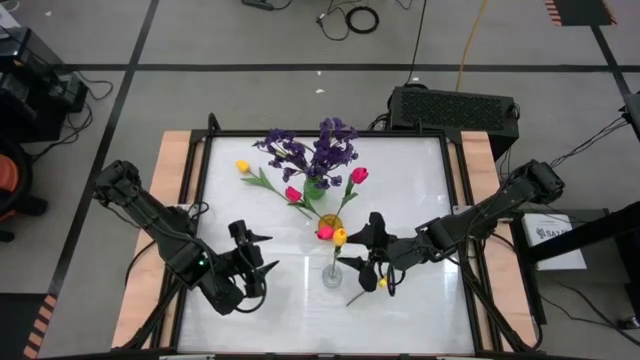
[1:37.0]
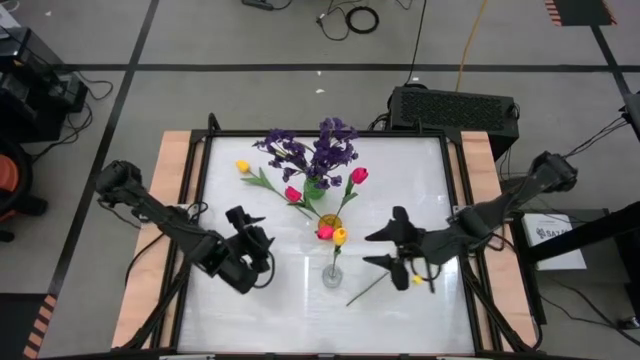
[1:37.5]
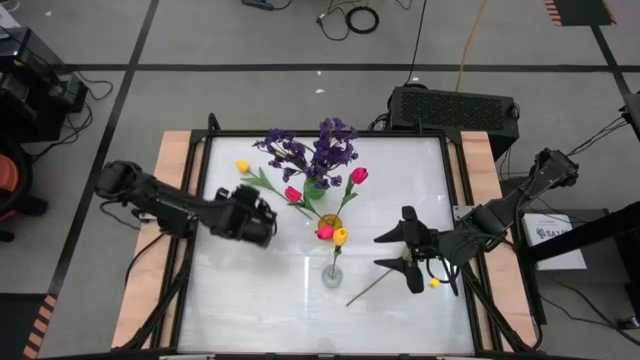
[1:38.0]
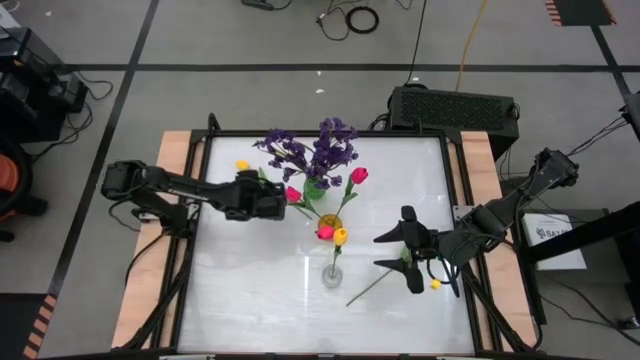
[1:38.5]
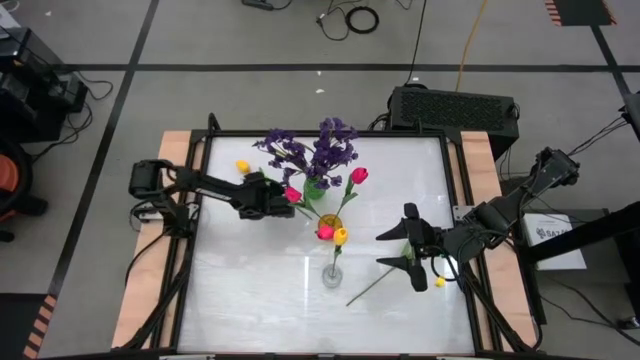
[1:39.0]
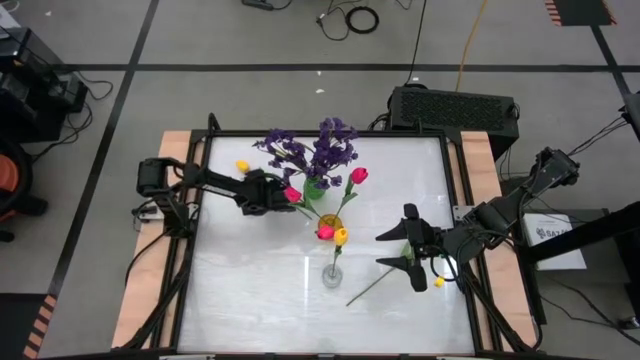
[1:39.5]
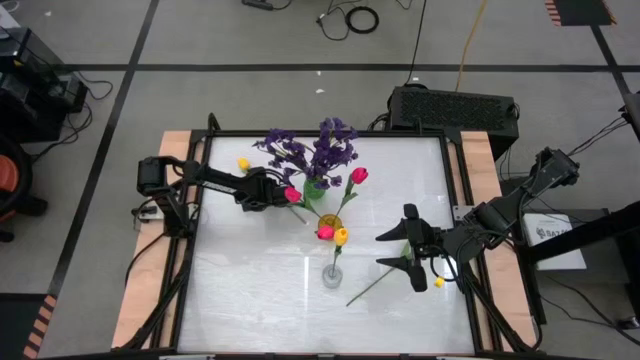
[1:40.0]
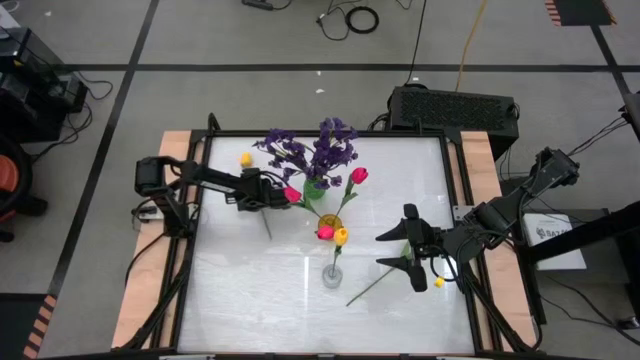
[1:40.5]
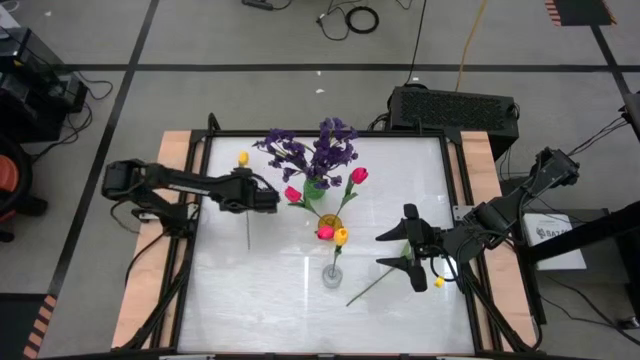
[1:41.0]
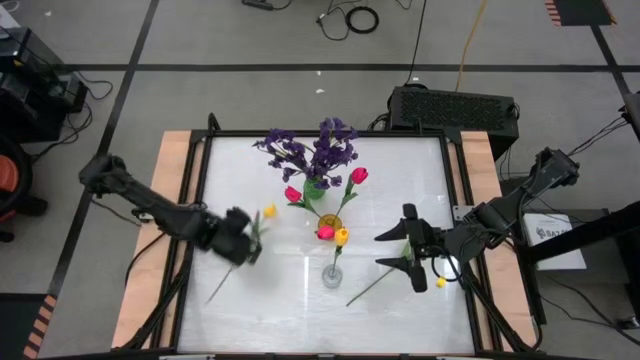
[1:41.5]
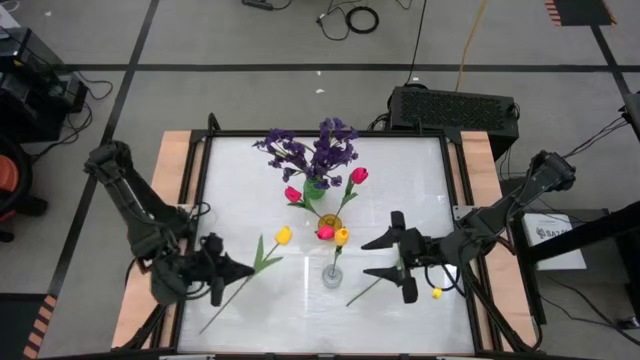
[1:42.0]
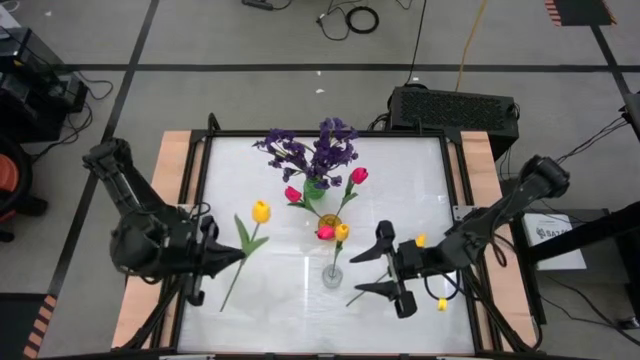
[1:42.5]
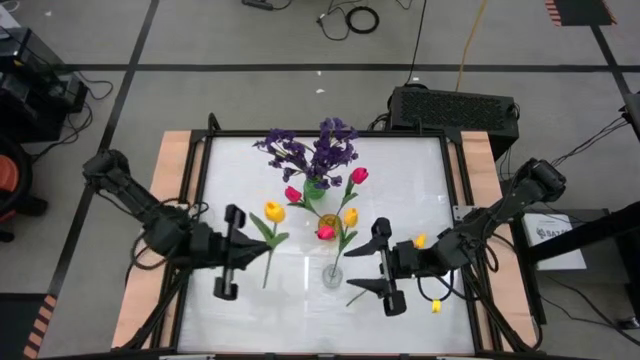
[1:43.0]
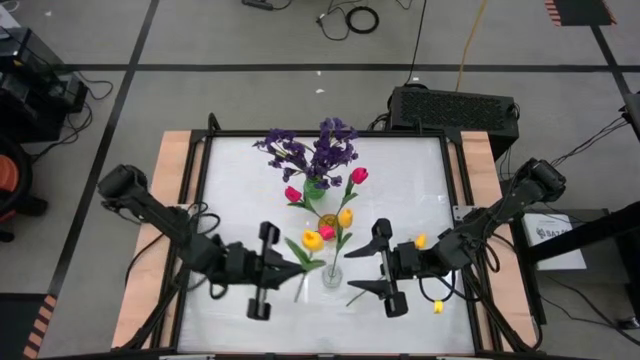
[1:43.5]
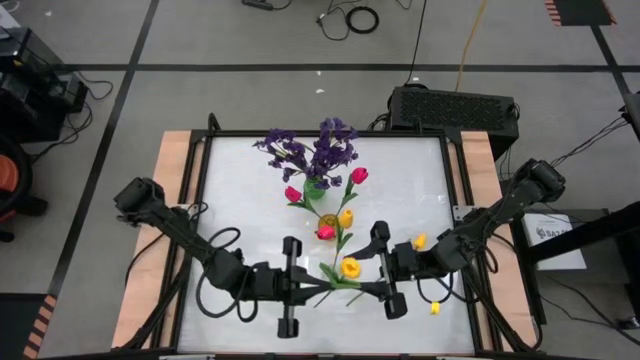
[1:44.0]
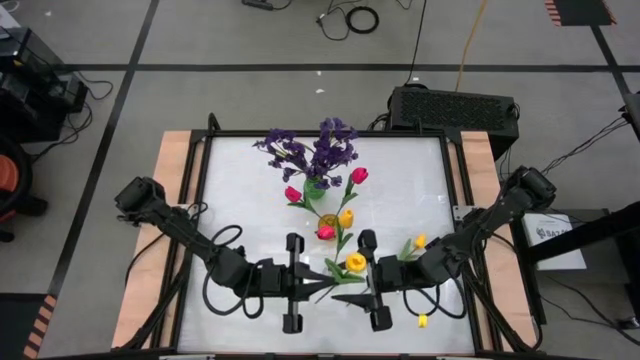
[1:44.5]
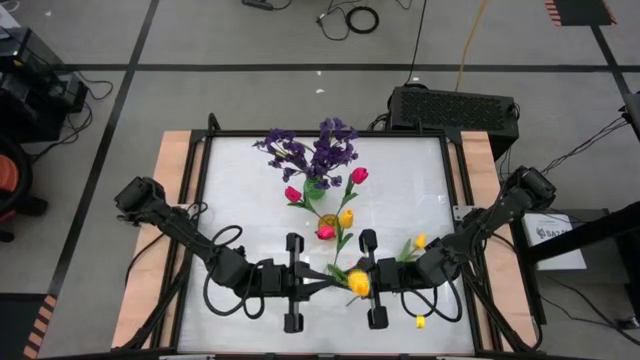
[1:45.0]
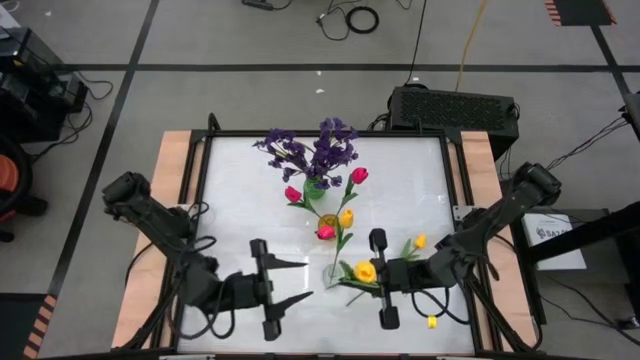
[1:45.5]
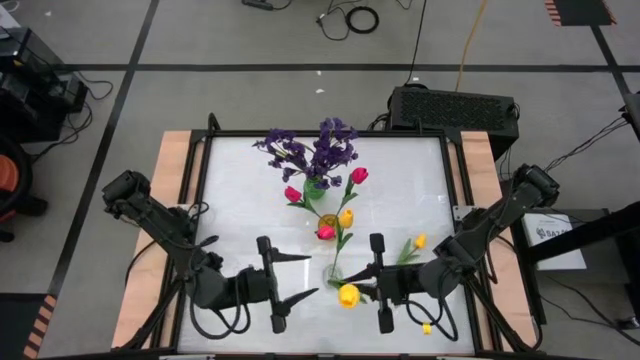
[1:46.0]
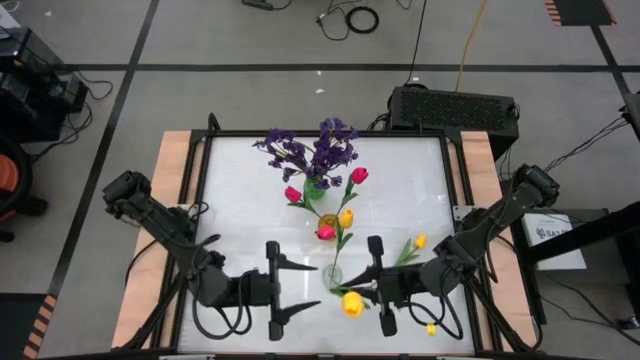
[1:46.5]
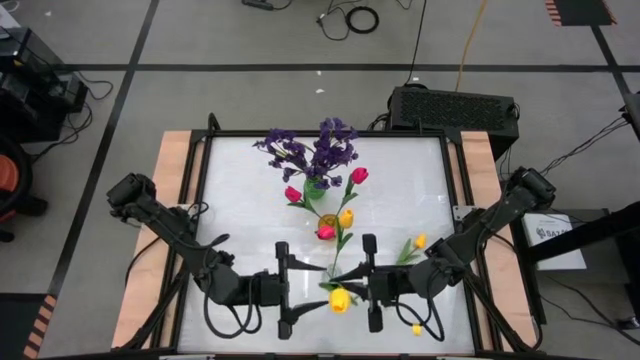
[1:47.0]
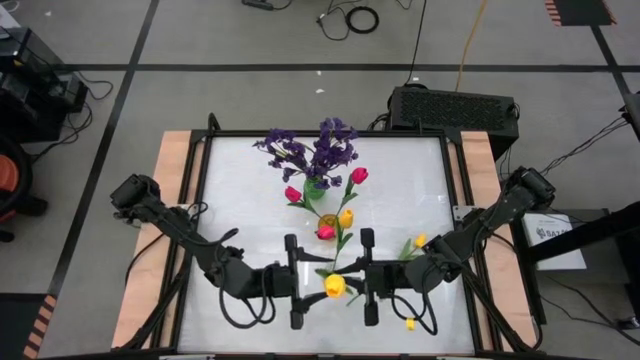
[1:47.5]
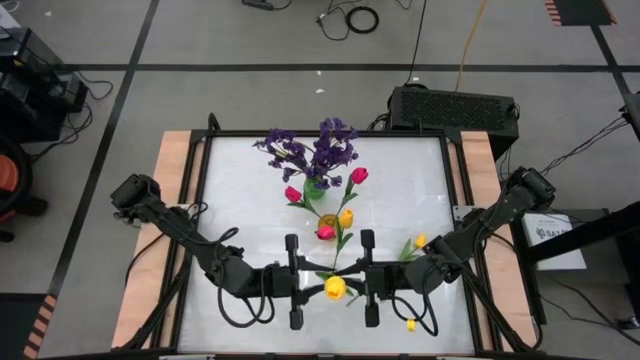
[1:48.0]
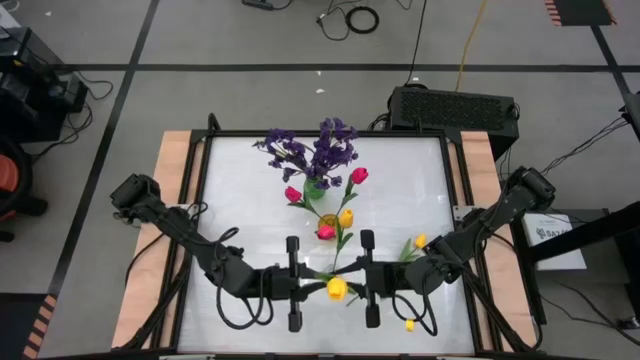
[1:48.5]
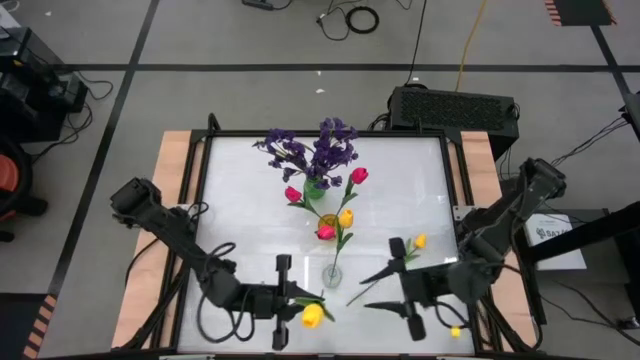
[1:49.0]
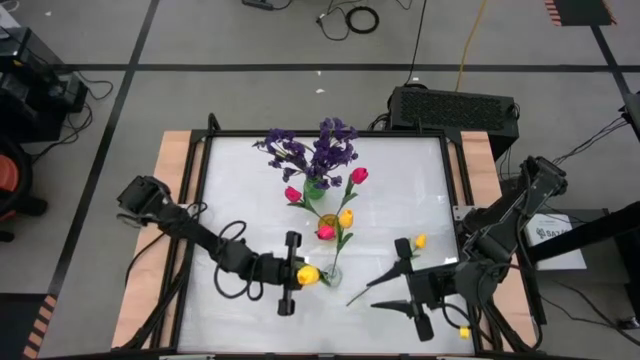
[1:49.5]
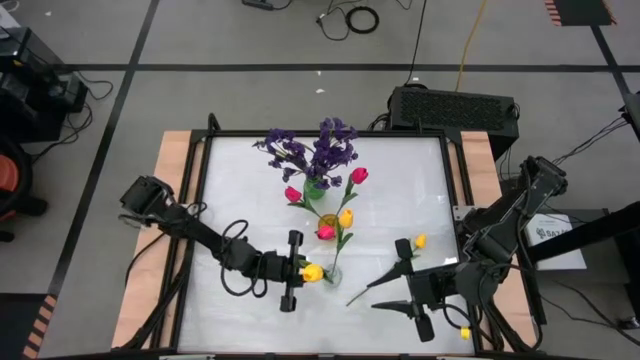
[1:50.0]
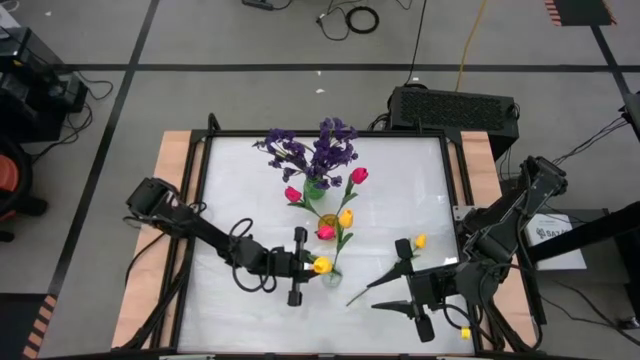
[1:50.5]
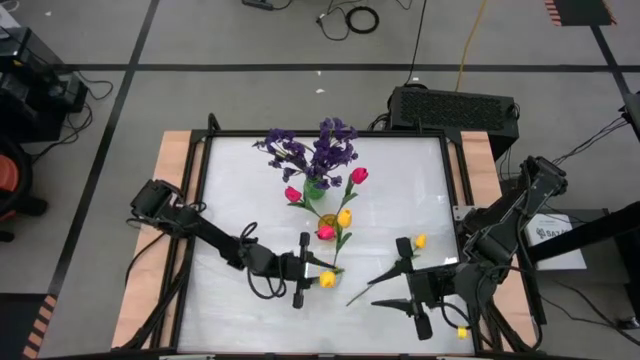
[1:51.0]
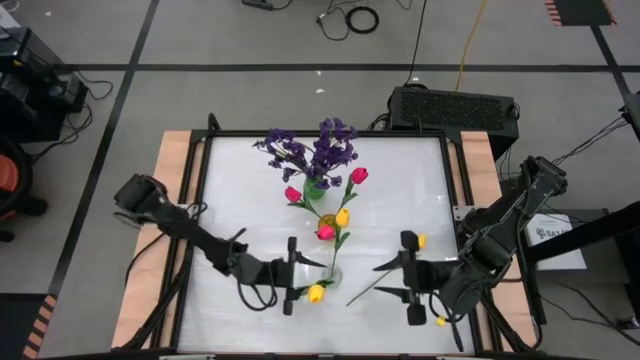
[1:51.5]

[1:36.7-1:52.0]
Task: Sort flowers into vase by color
Put the top yellow flower into the transparent vase

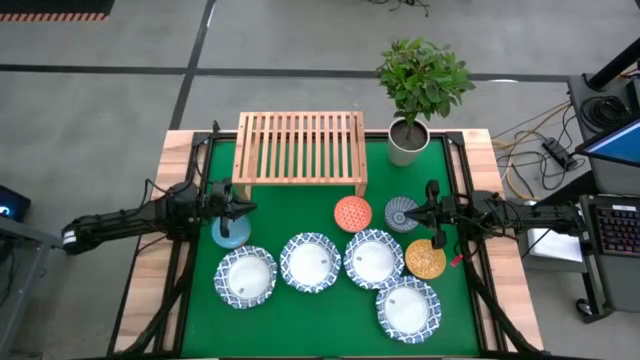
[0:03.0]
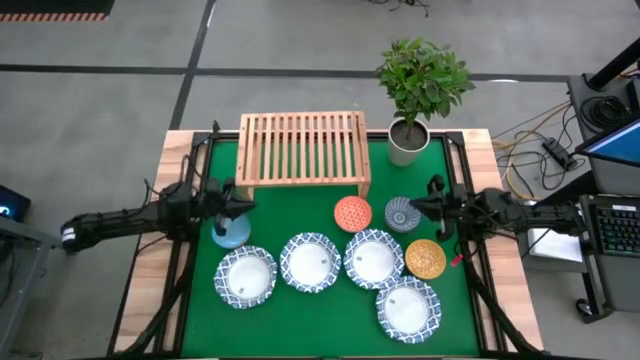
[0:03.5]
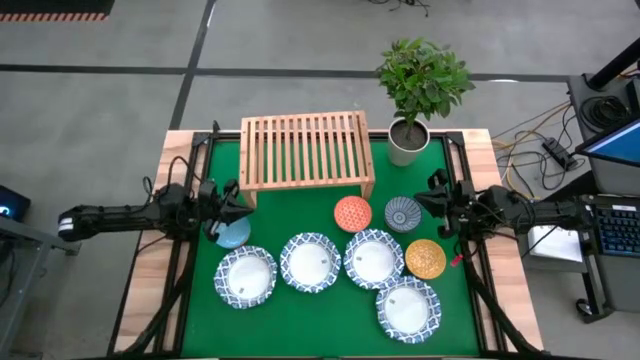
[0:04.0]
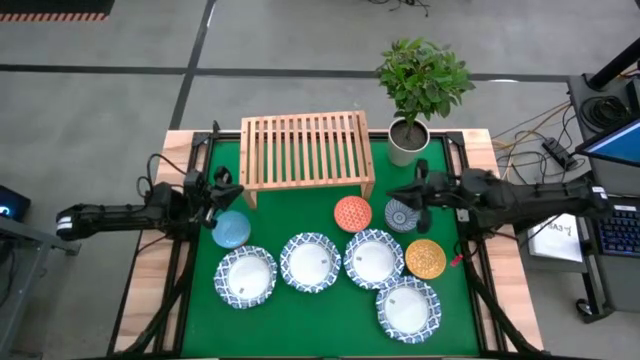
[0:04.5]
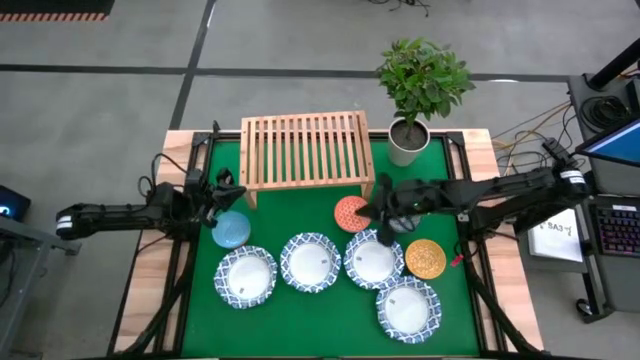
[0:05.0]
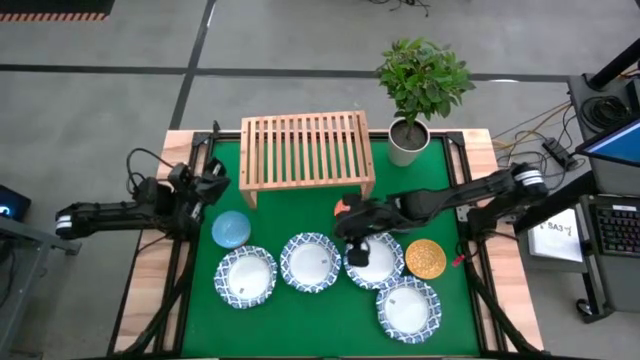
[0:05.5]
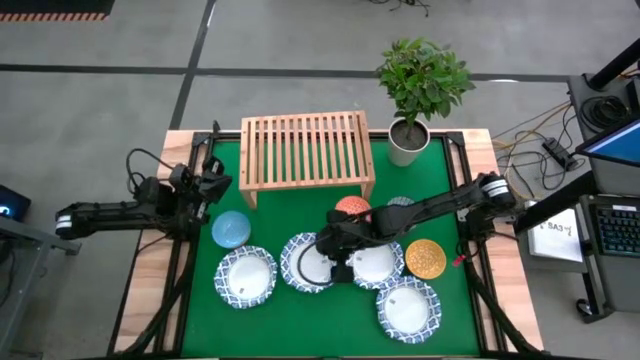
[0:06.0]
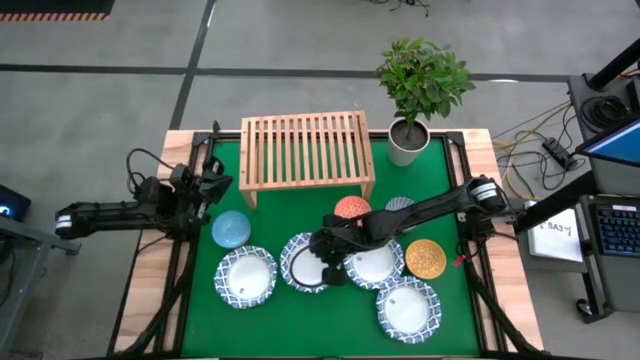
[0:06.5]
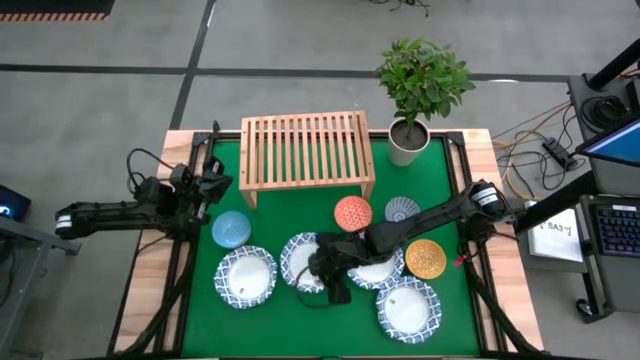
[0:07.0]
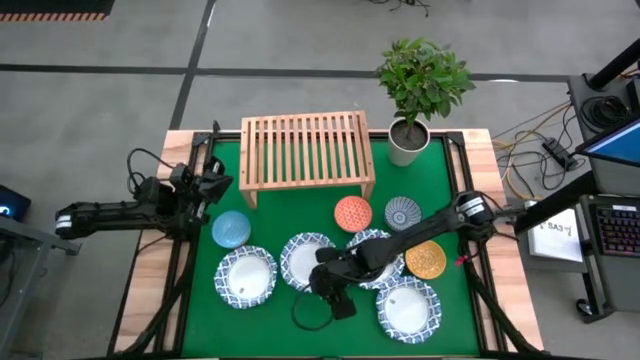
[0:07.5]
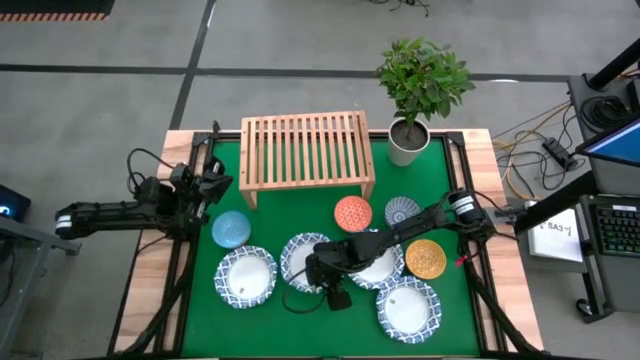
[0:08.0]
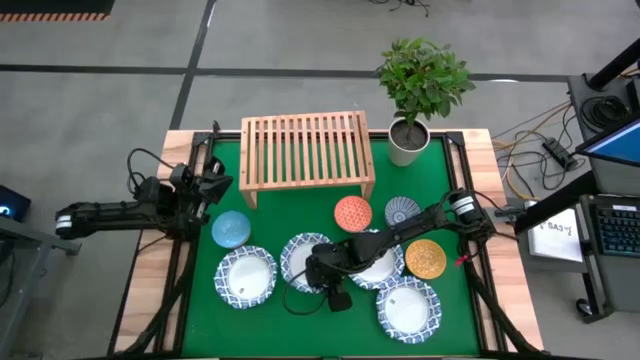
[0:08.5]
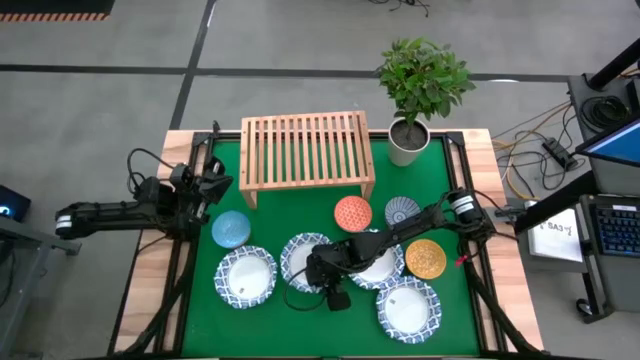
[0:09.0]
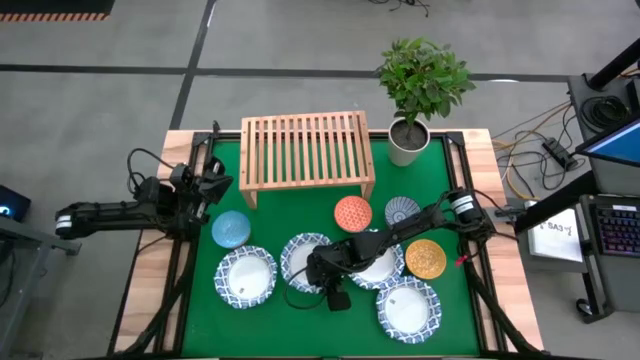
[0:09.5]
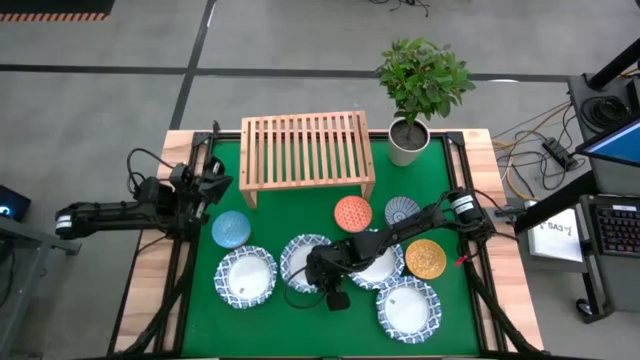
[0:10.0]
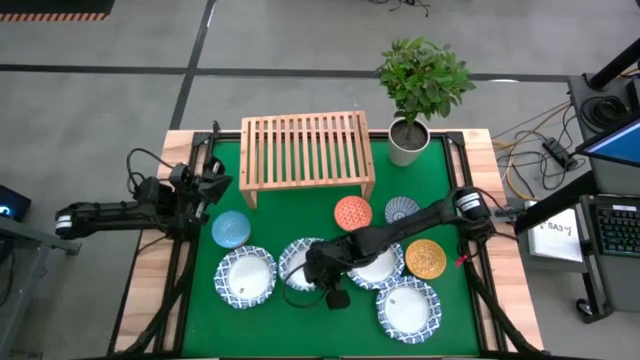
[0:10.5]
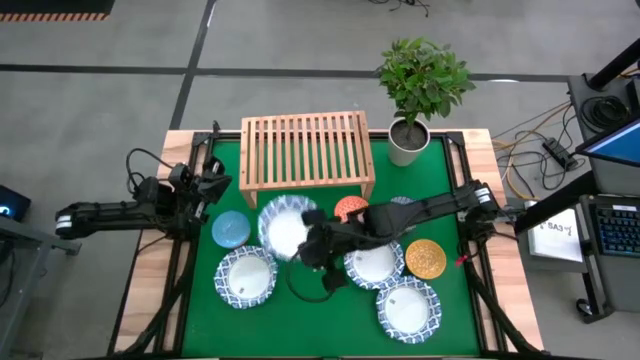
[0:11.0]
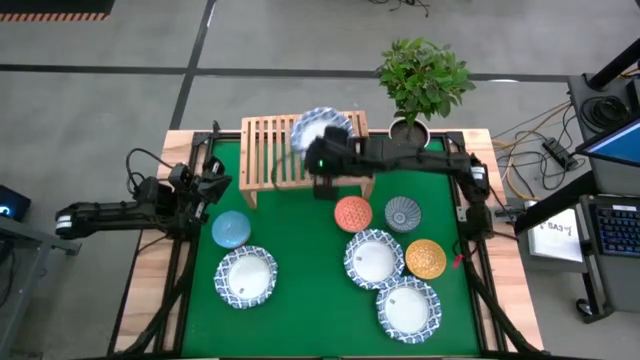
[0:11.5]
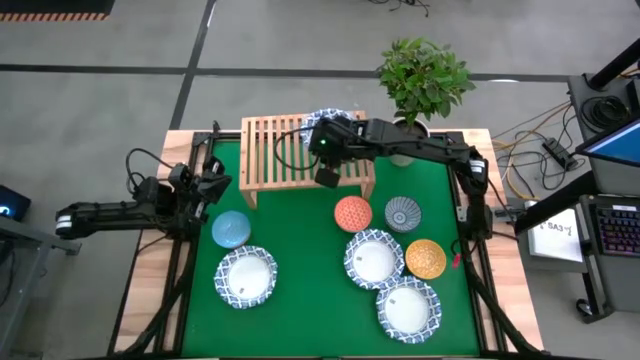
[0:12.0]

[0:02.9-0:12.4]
Task: Place and stack bowls onto a shelf
Put the white bowl on the shelf
